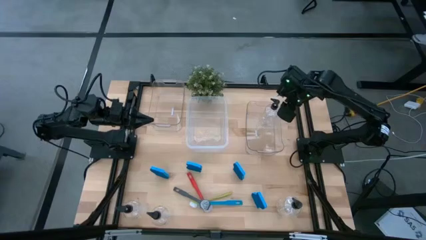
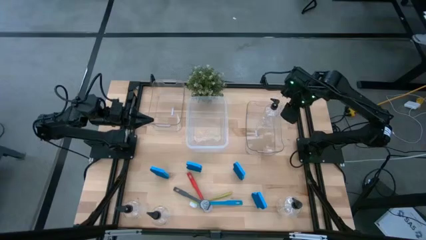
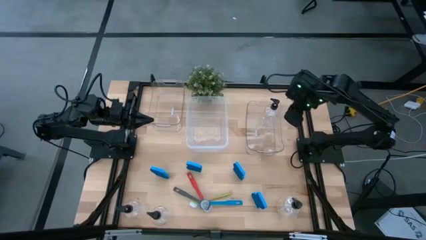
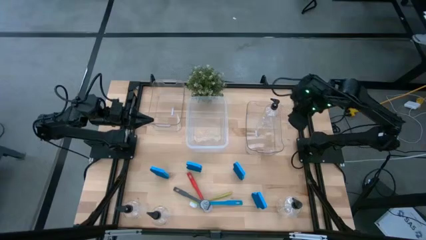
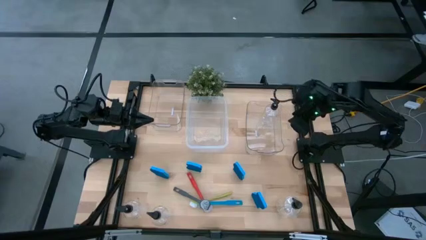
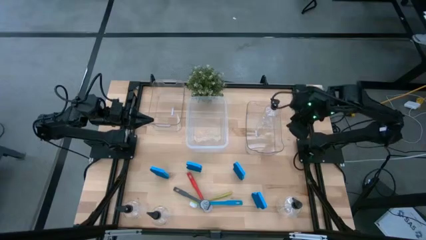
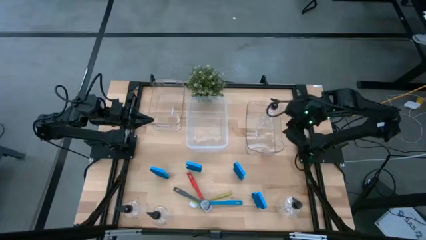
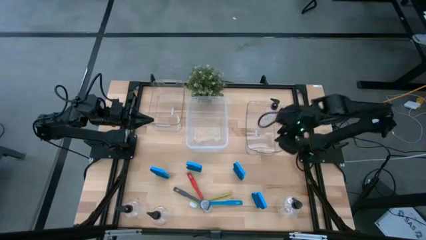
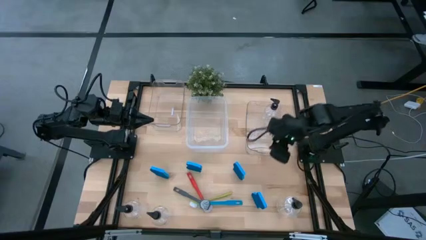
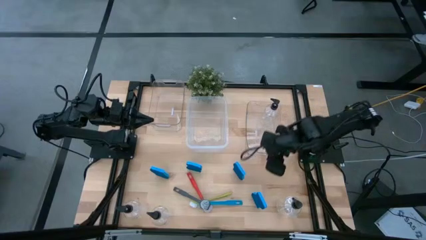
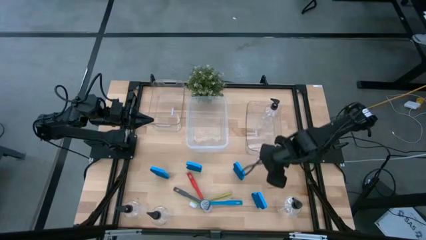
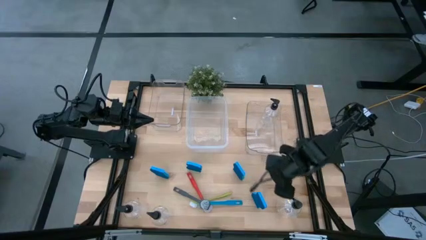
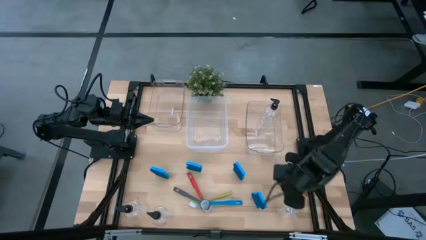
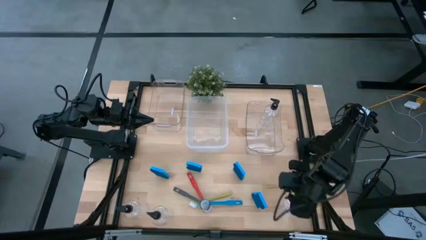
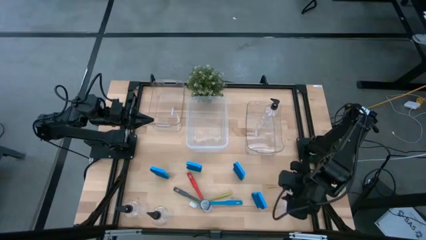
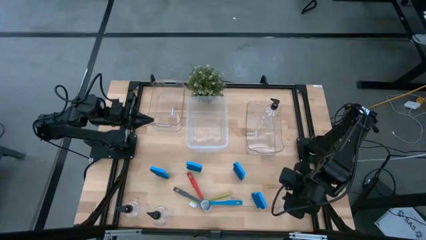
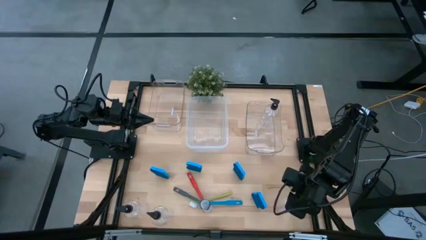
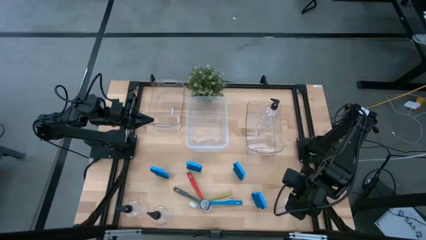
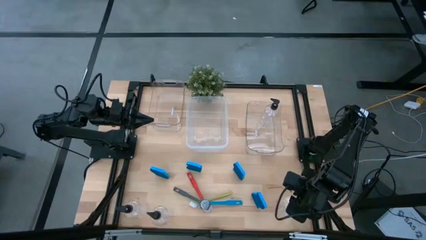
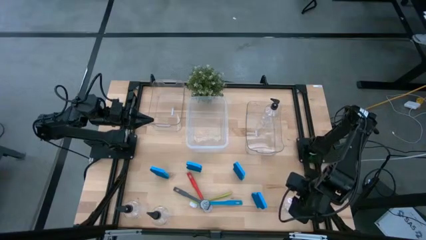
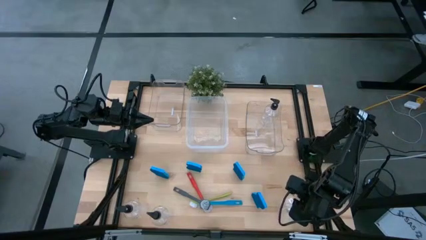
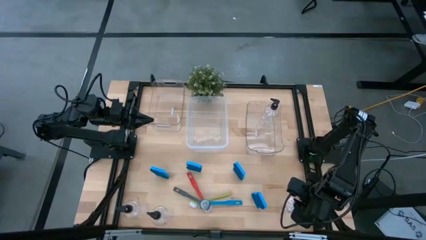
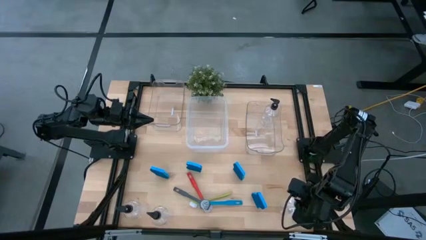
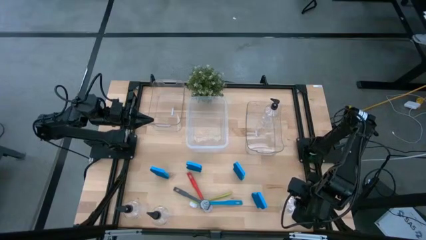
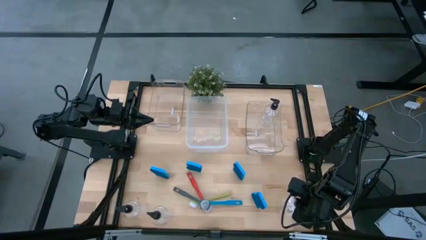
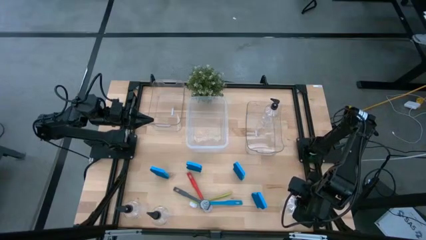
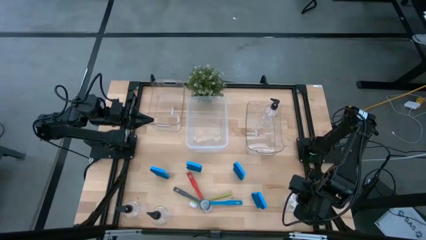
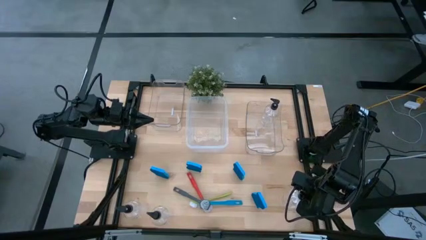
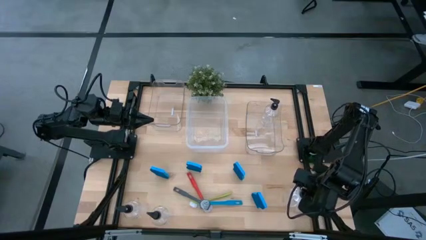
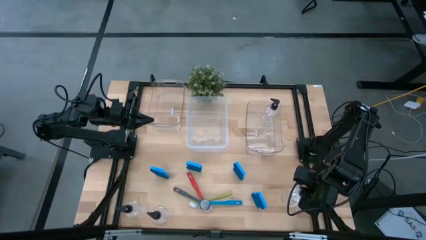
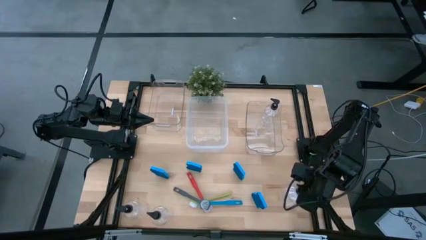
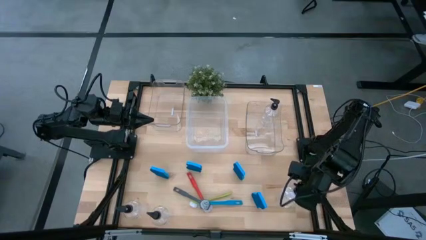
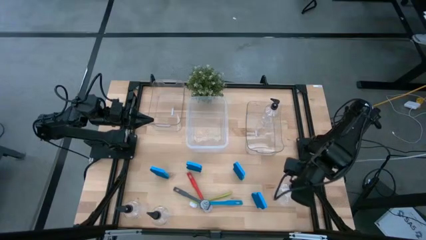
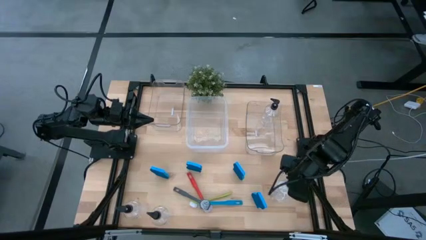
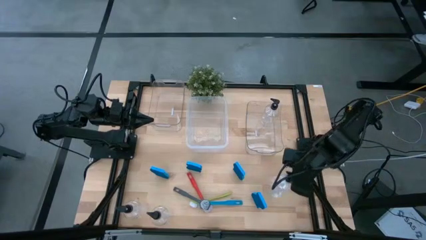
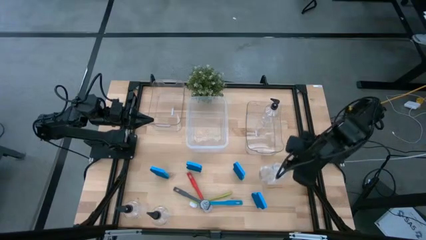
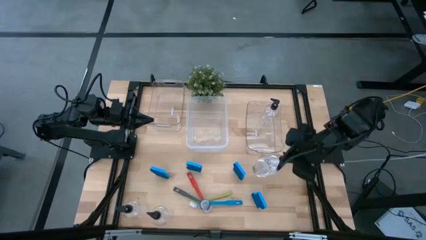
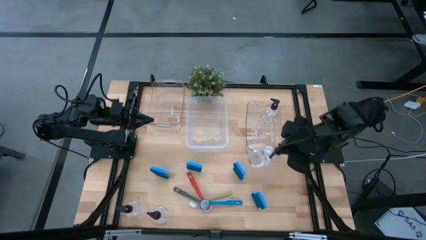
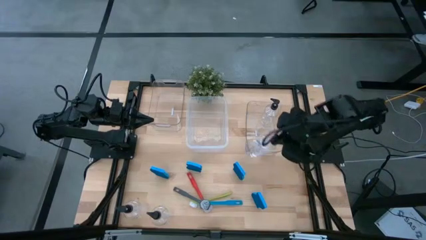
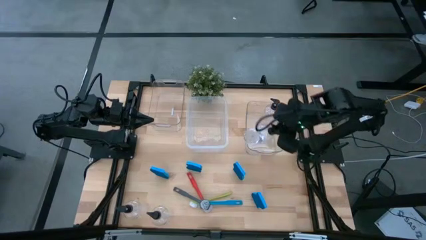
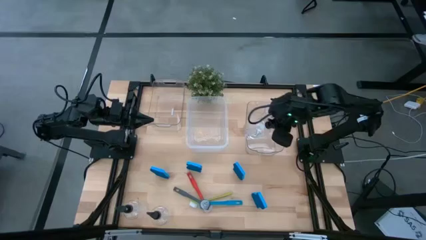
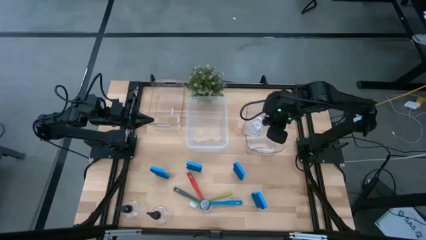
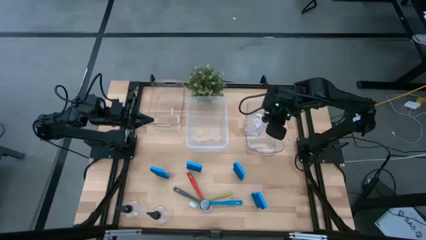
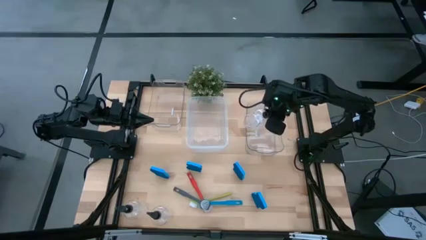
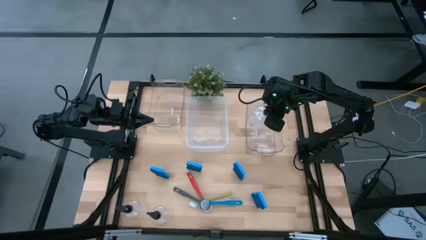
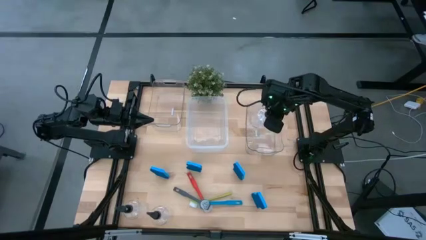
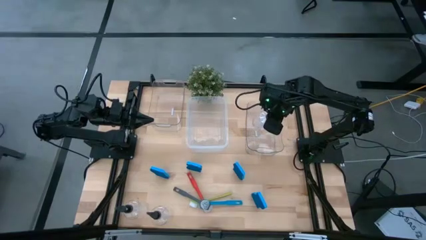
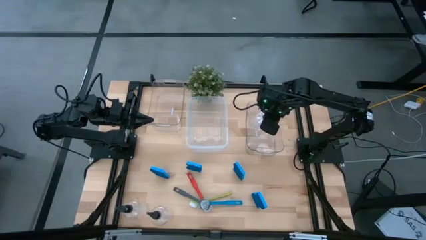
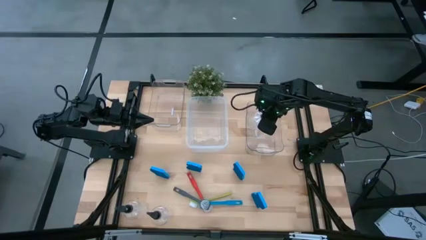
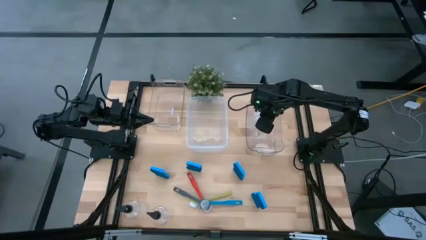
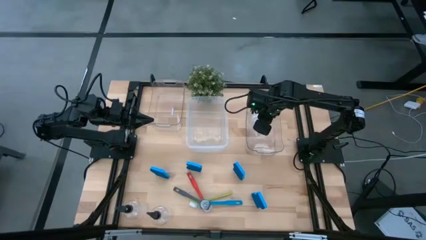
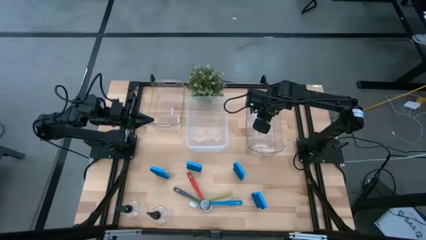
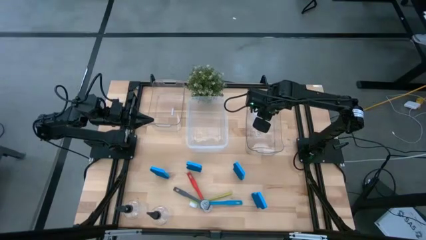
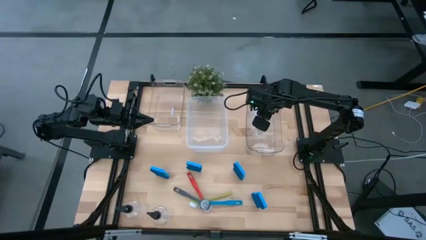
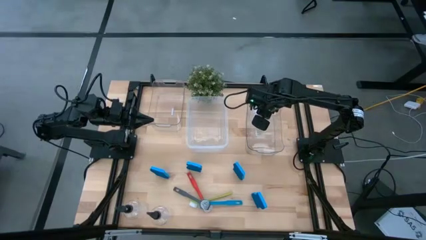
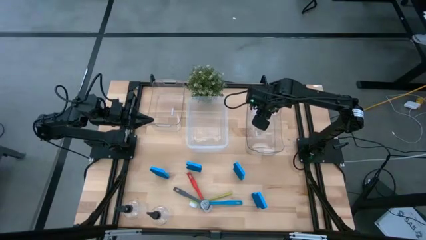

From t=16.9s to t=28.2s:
Task: Pick & Place Kitchen Sink Supplies
Put the transparent bottle into the right transparent bin
